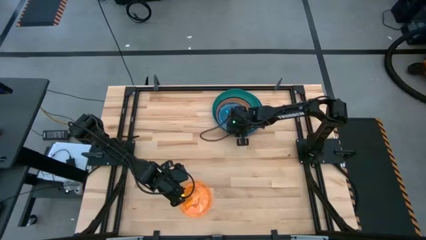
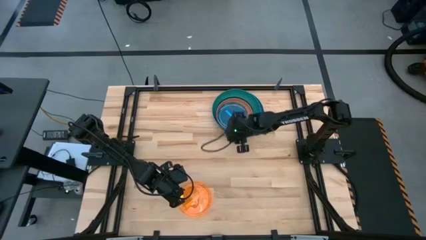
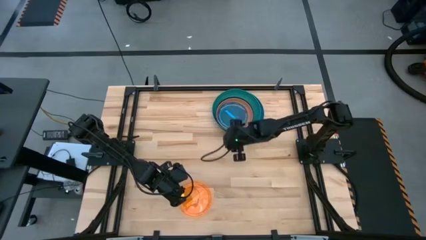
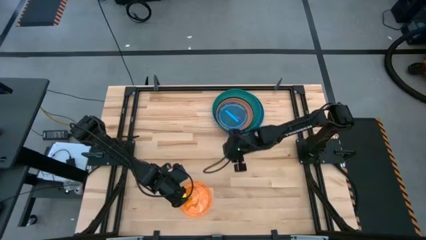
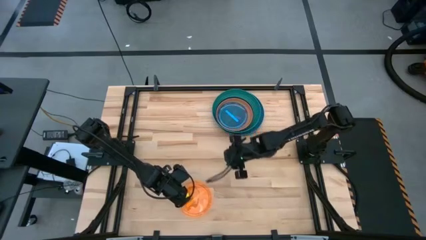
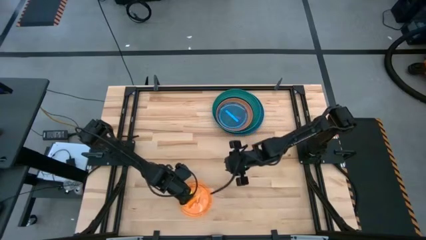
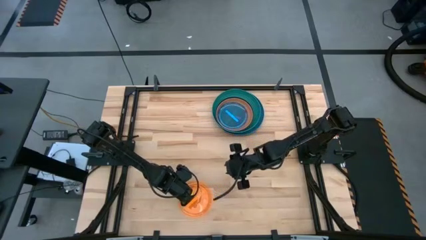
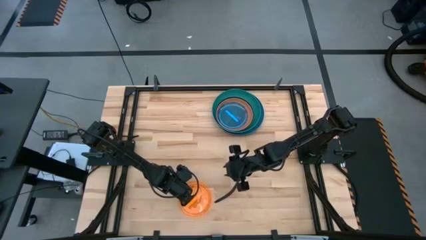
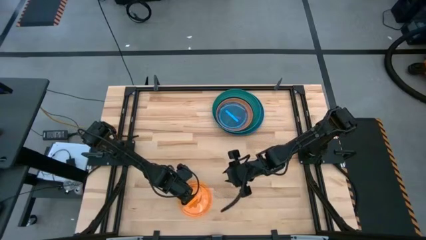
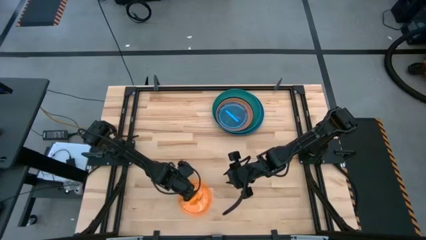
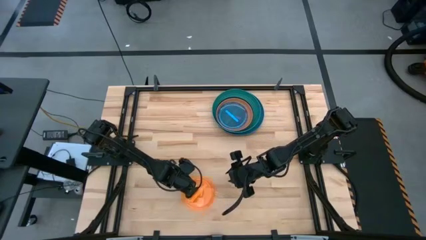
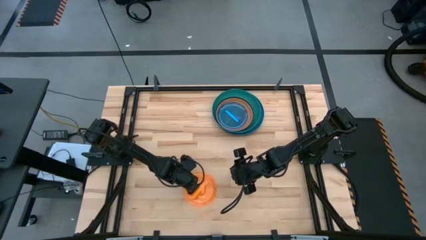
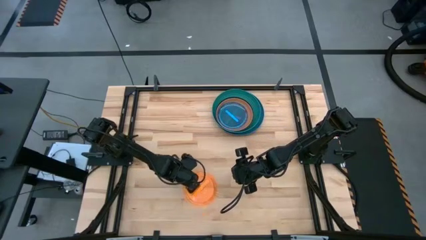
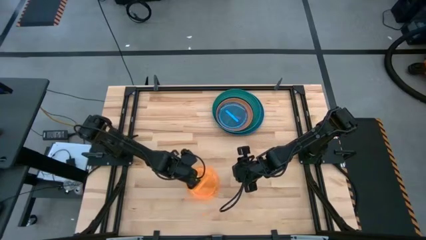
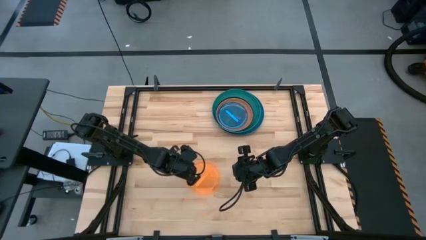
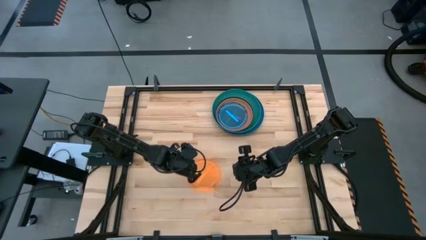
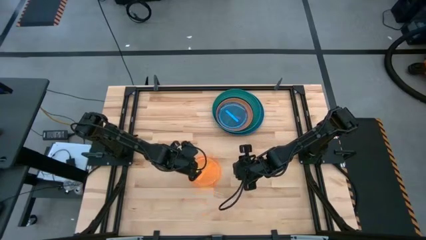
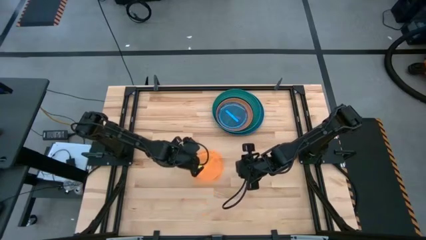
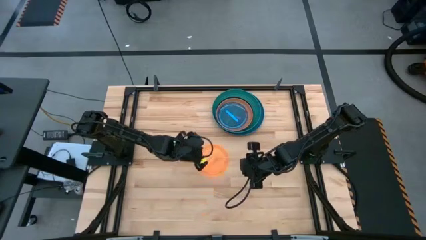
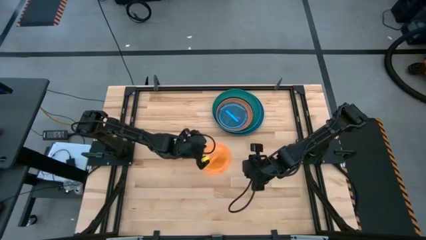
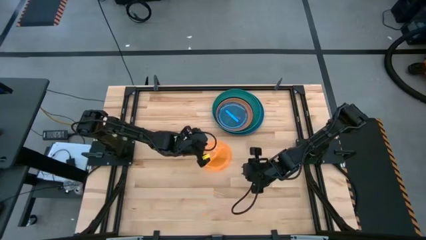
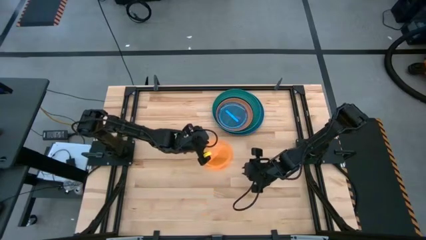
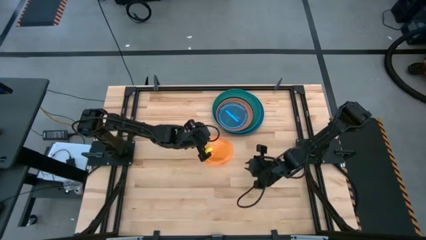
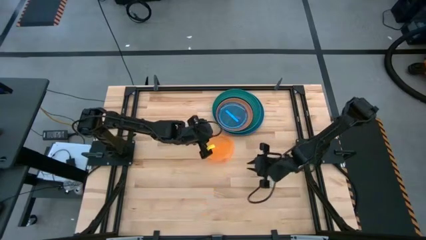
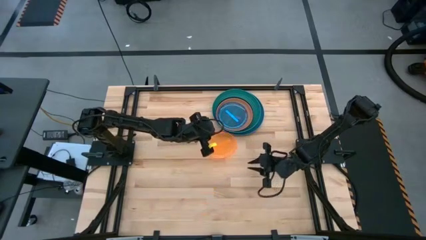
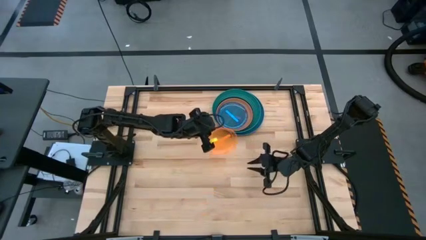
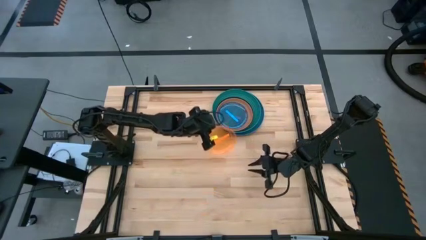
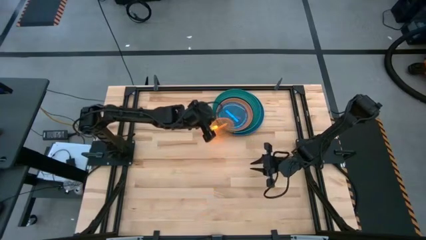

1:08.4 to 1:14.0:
Task: Stack plastic plates
Stack the orange plate on the blue plate

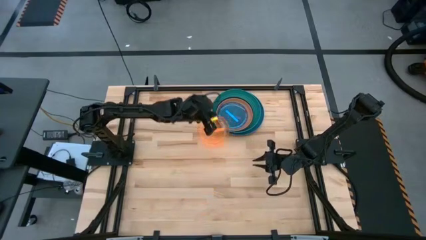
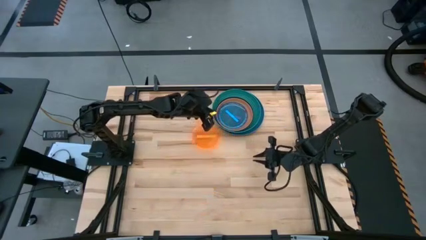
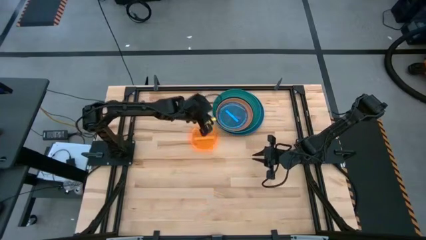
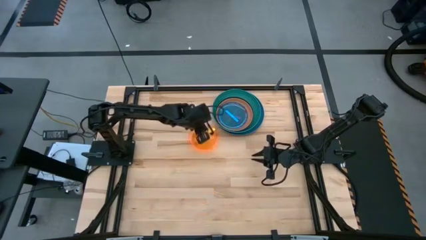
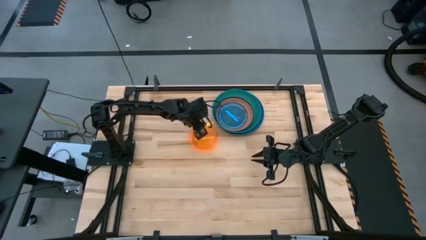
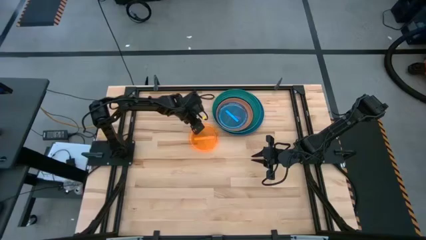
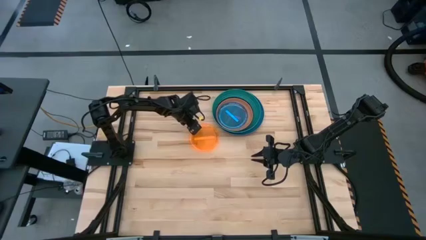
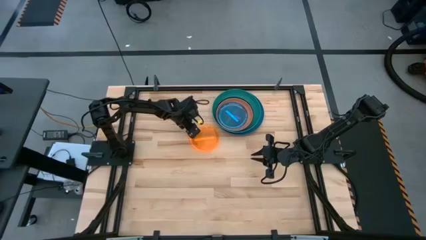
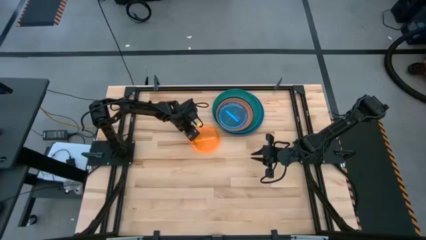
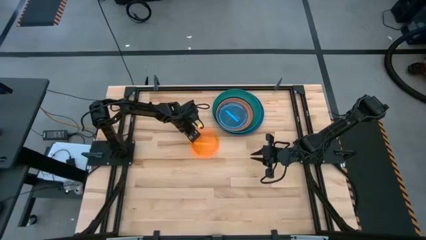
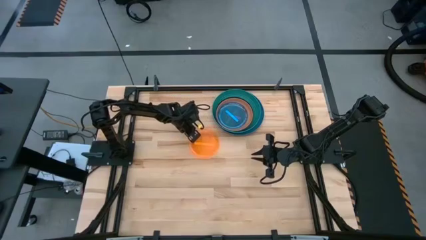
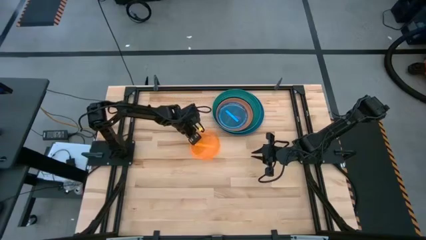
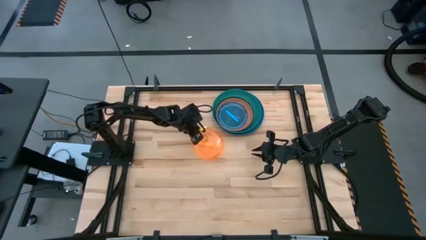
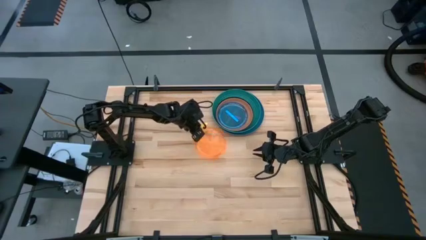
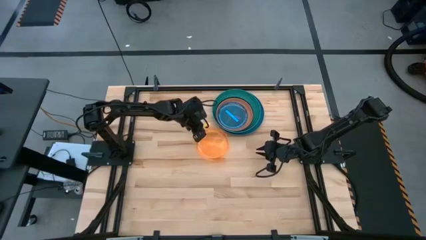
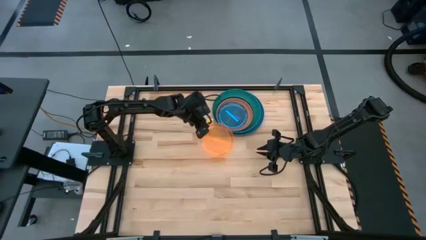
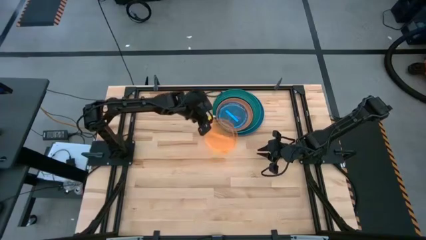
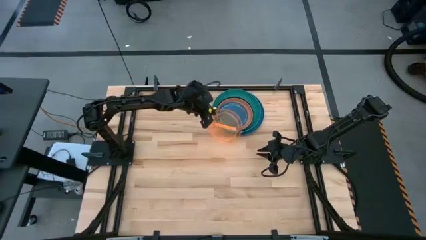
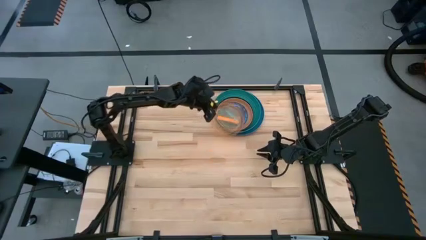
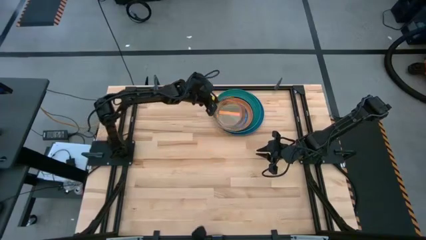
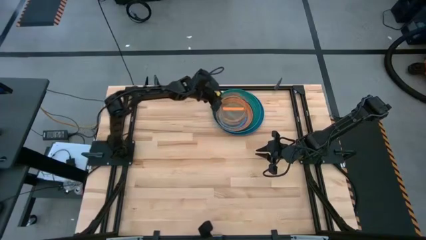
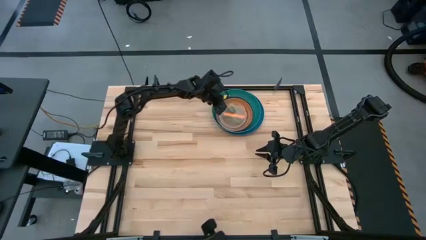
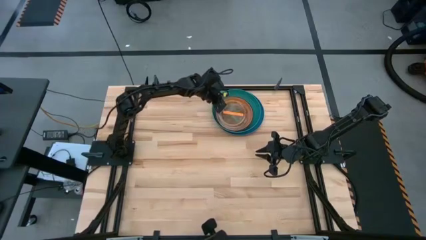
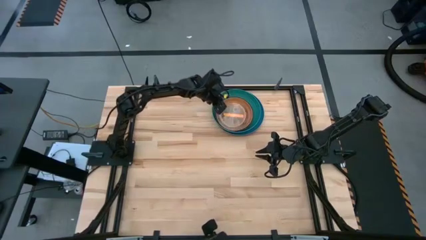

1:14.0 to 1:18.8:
Stack the orange plate on the blue plate

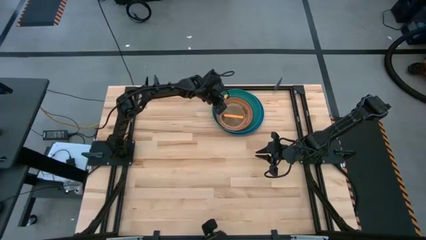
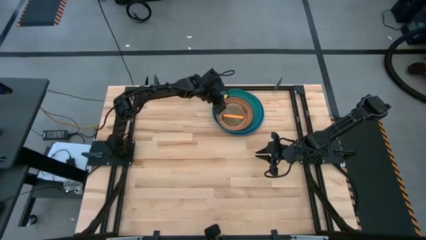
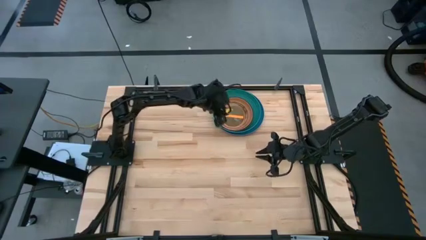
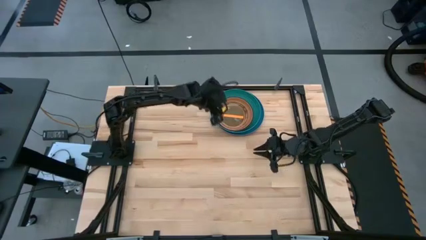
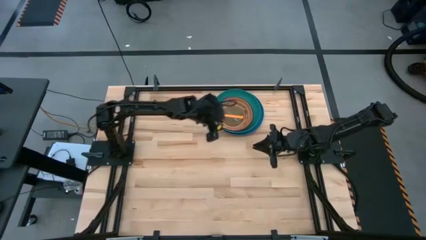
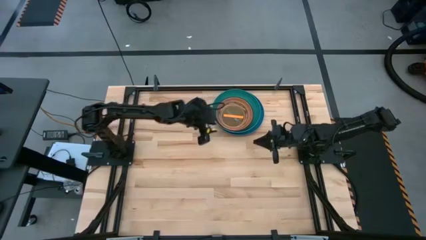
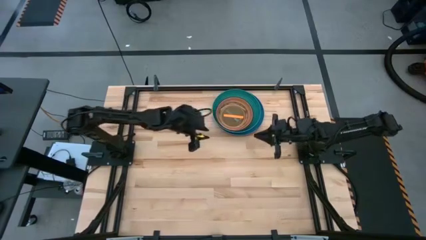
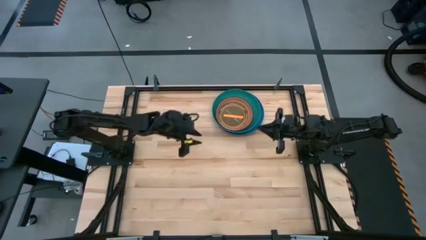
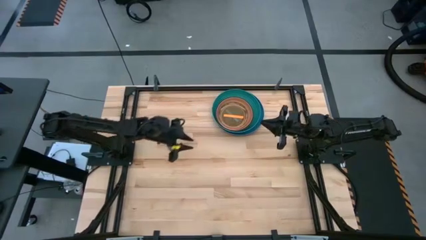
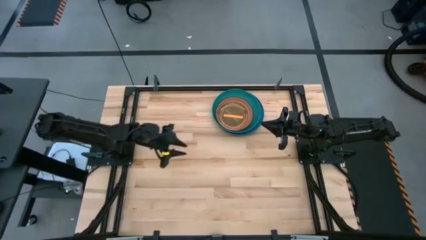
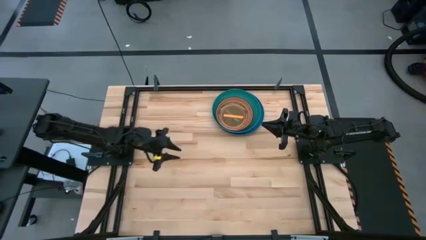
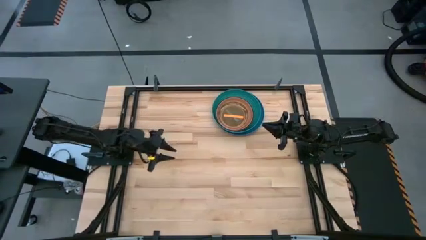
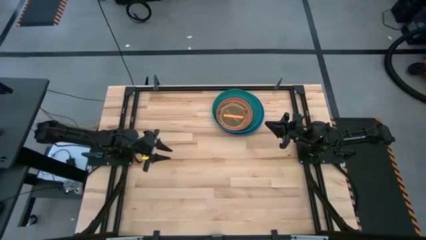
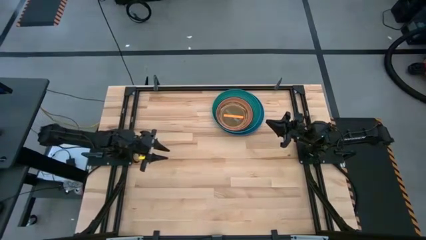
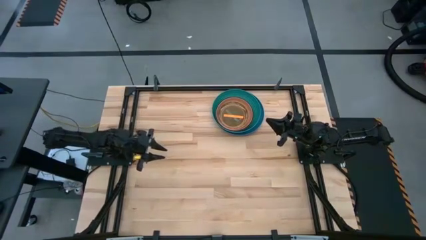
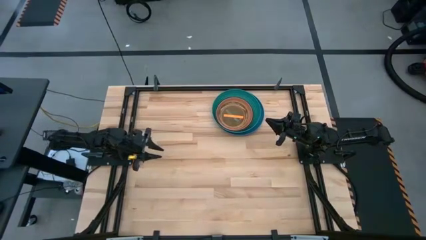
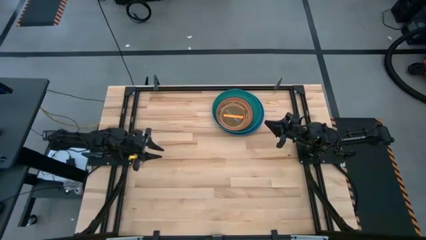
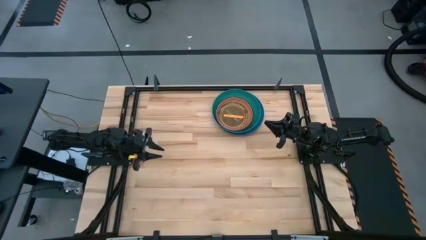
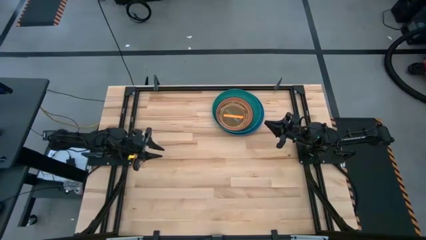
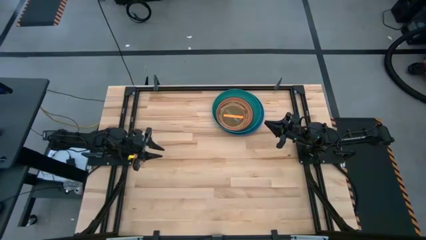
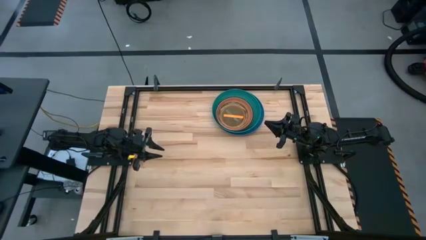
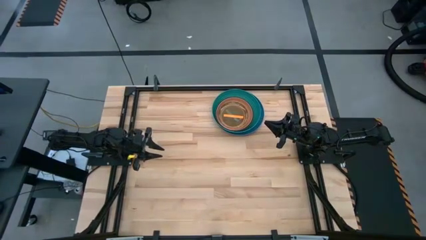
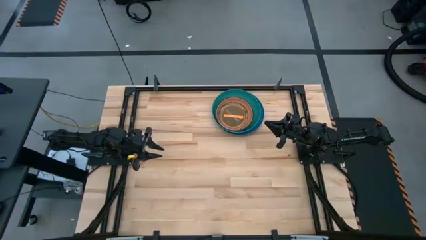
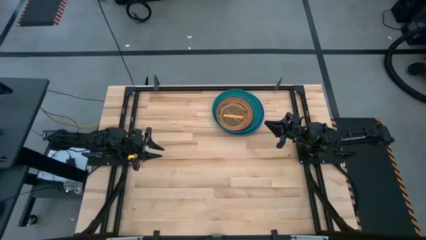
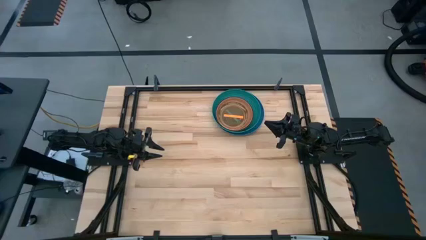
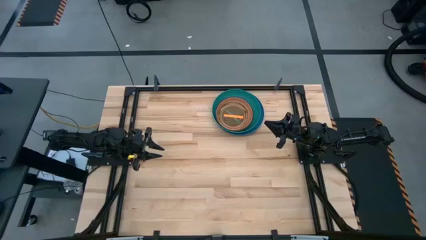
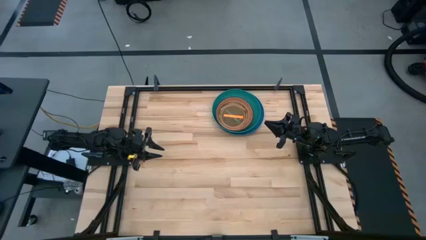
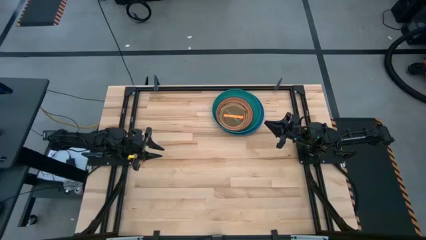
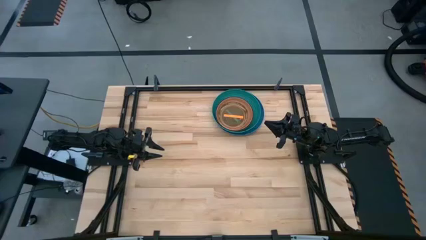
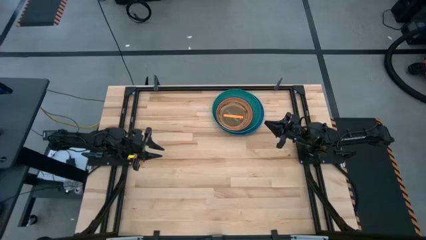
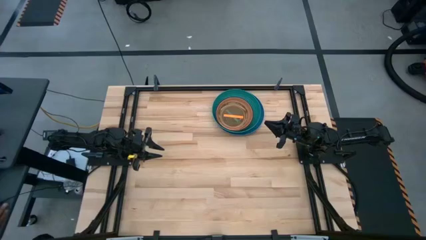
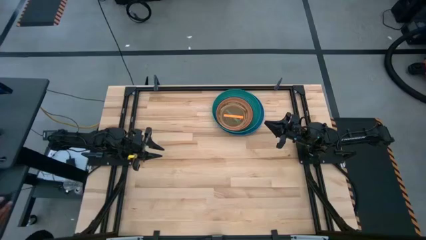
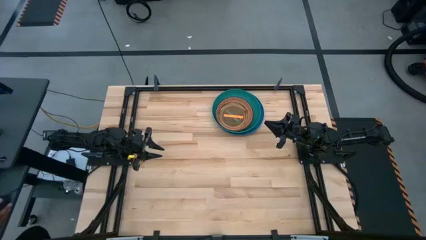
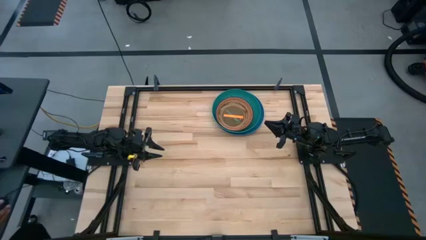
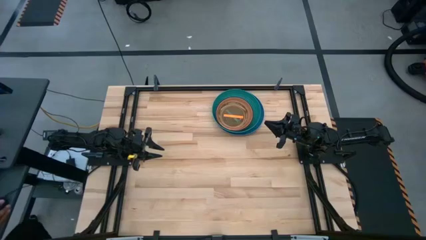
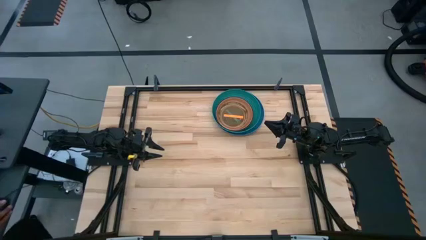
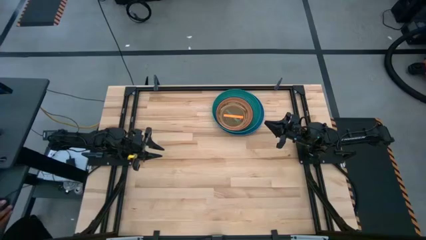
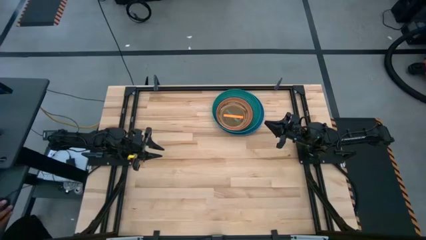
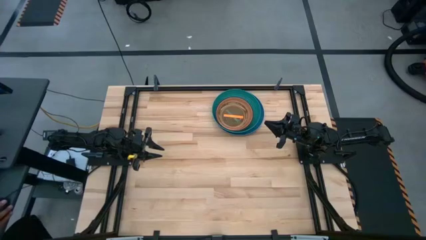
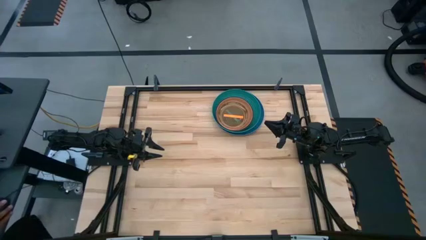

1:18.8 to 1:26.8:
Return to Home Position
